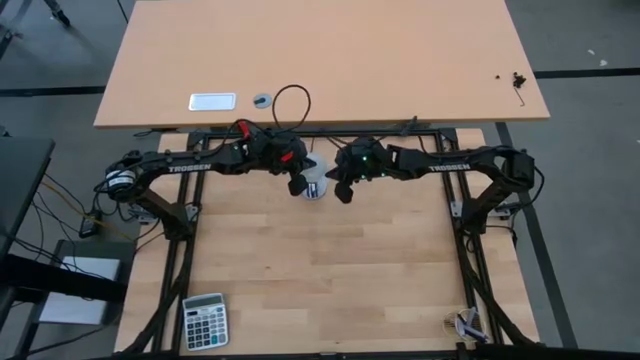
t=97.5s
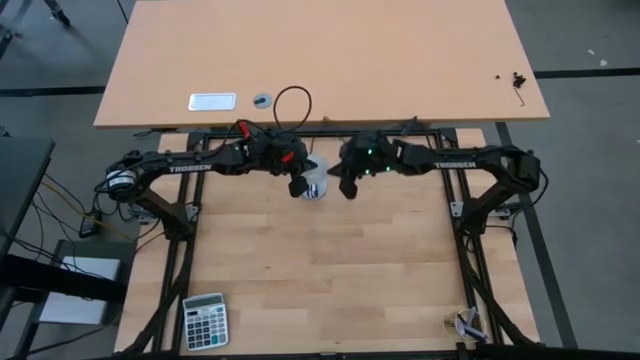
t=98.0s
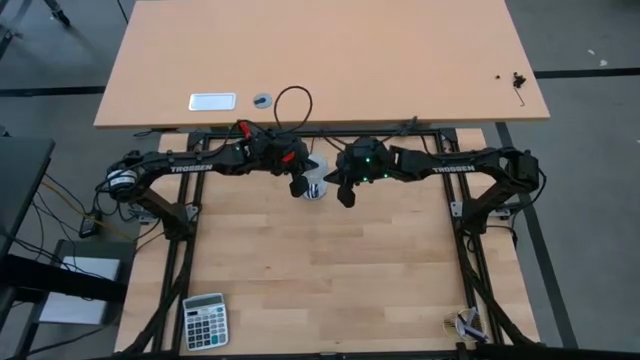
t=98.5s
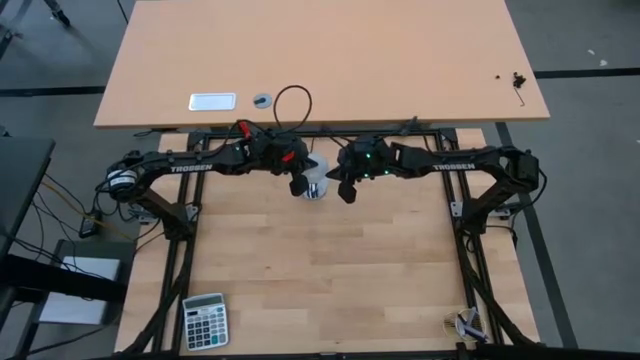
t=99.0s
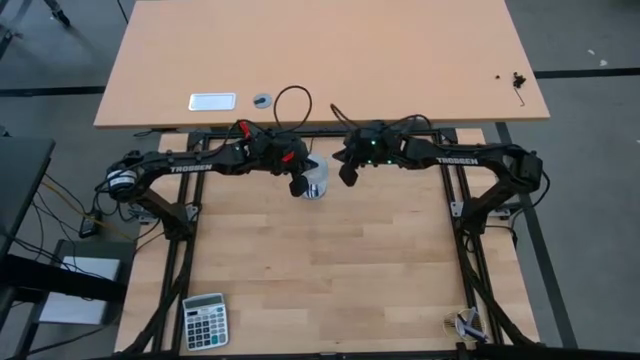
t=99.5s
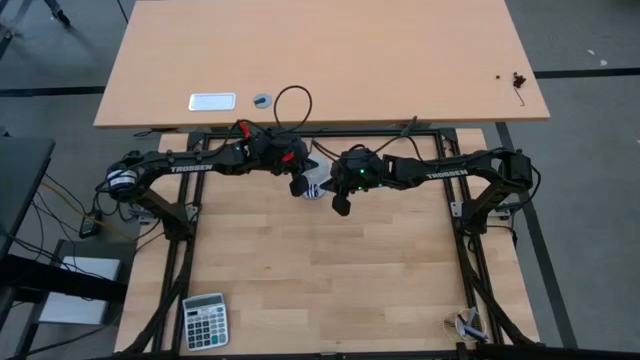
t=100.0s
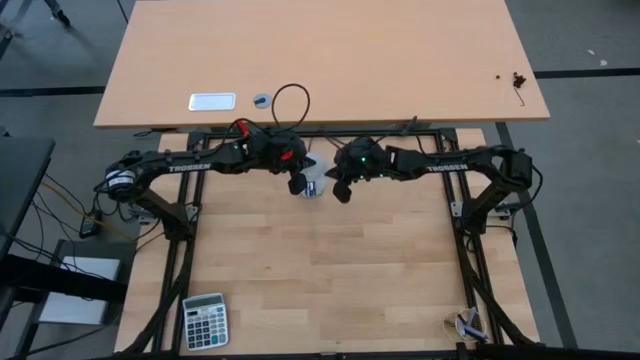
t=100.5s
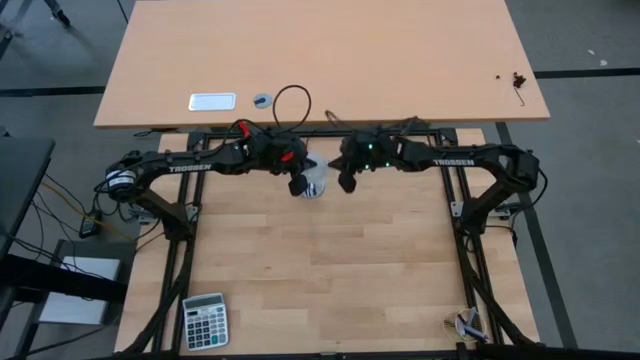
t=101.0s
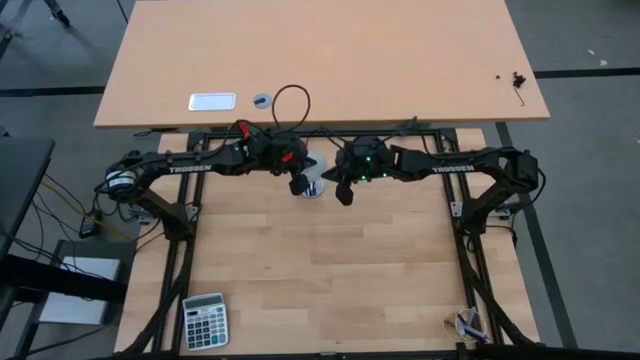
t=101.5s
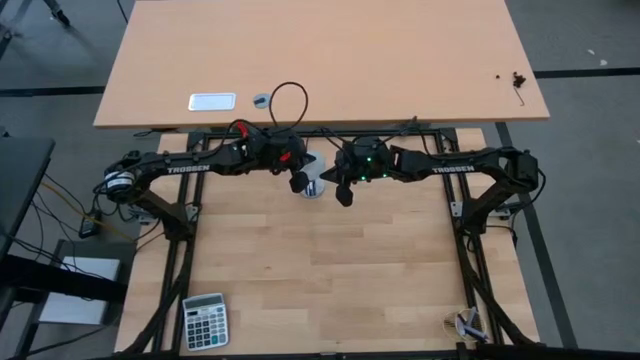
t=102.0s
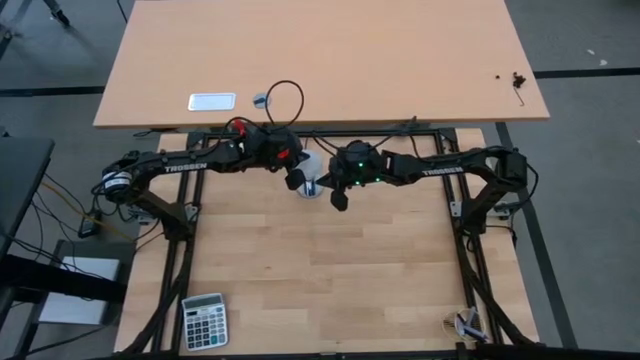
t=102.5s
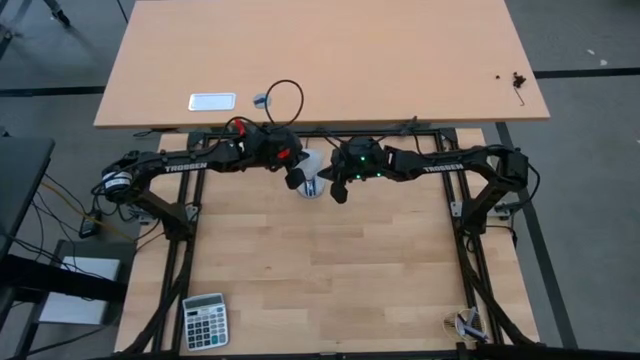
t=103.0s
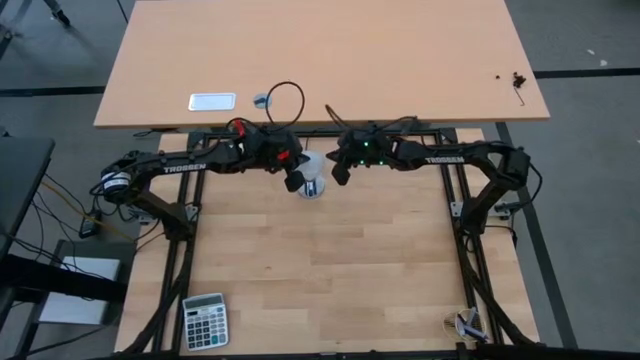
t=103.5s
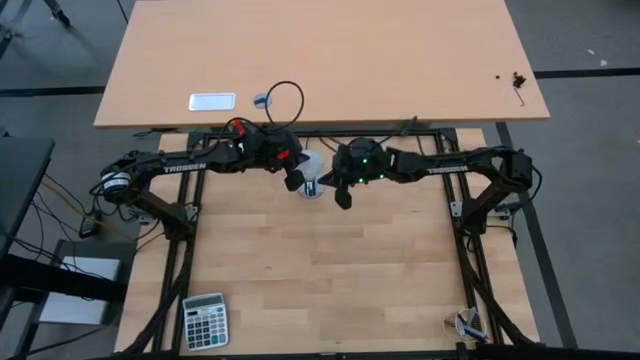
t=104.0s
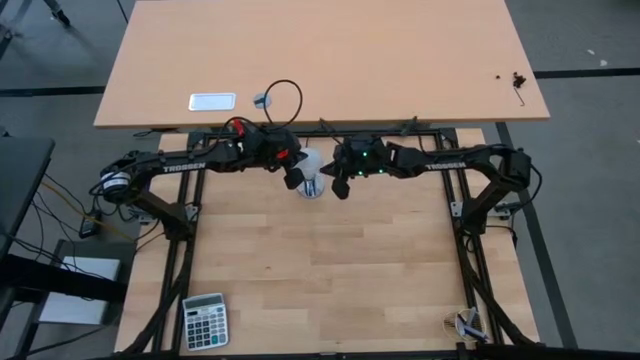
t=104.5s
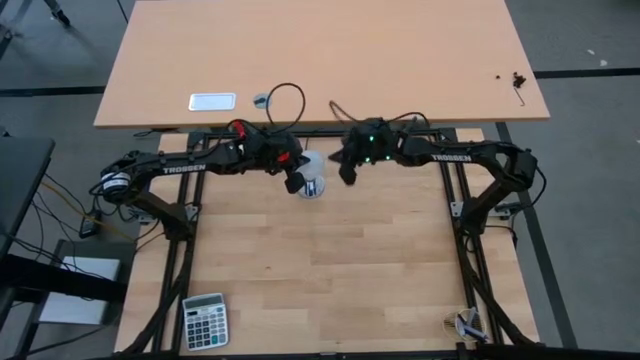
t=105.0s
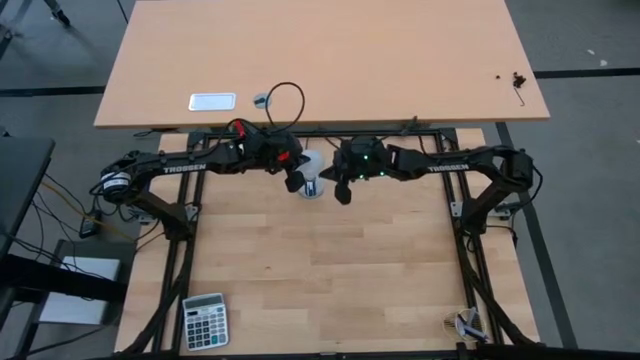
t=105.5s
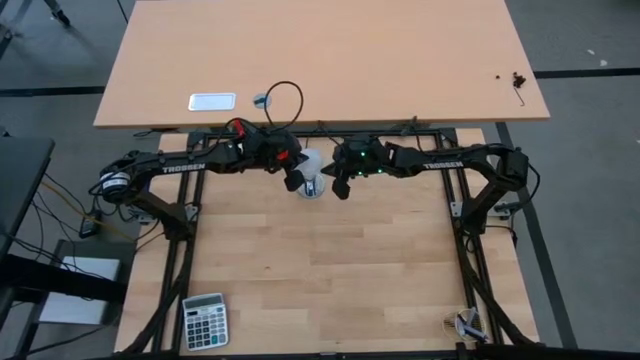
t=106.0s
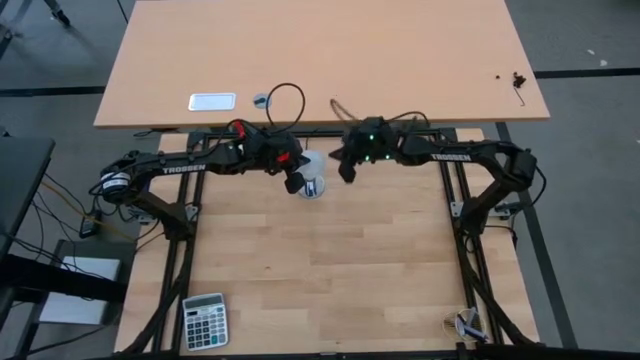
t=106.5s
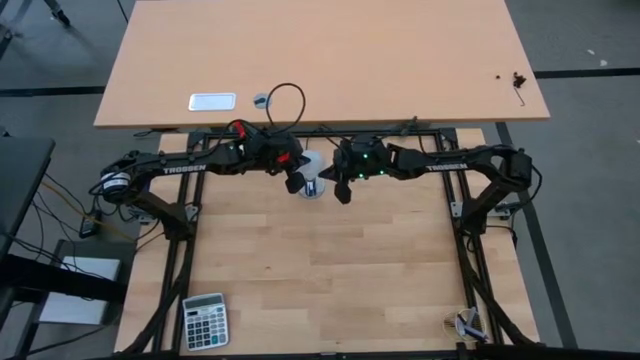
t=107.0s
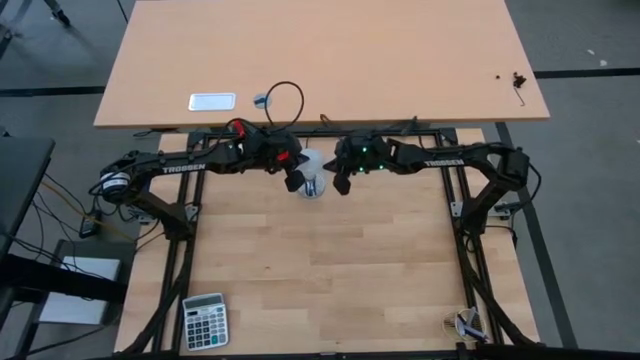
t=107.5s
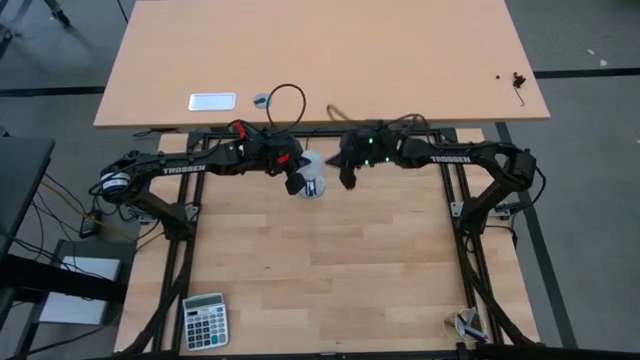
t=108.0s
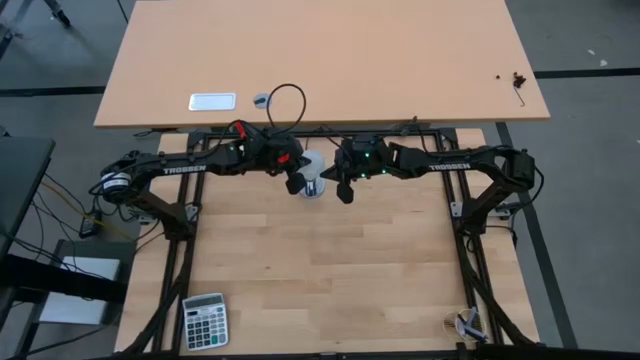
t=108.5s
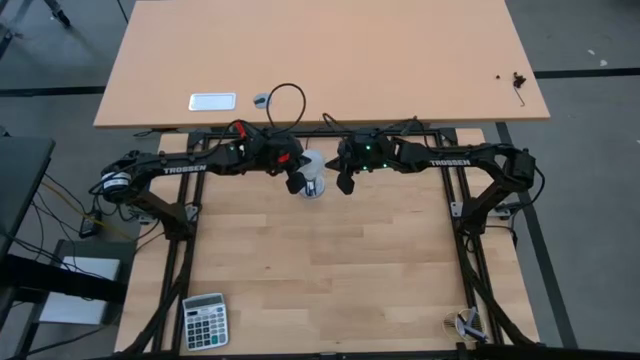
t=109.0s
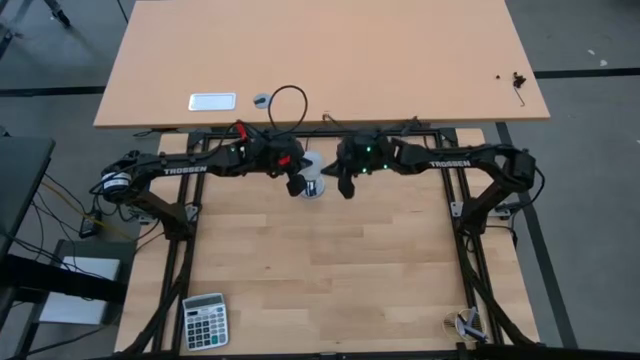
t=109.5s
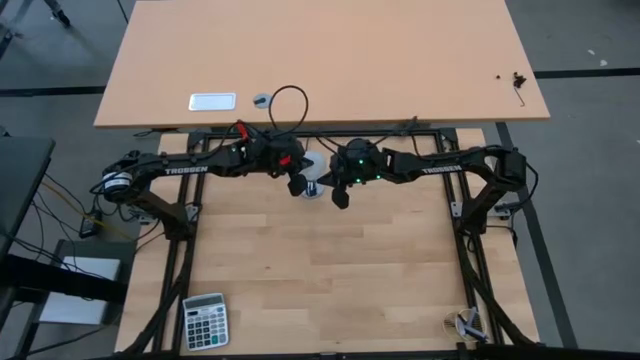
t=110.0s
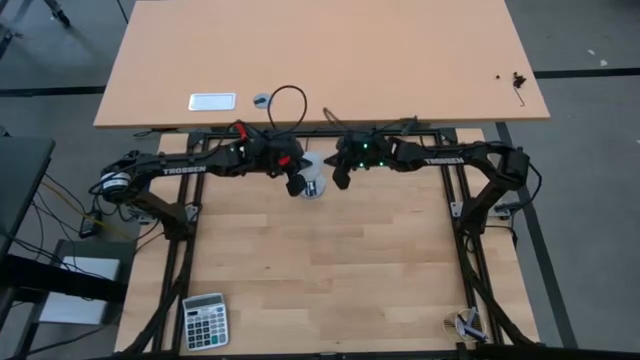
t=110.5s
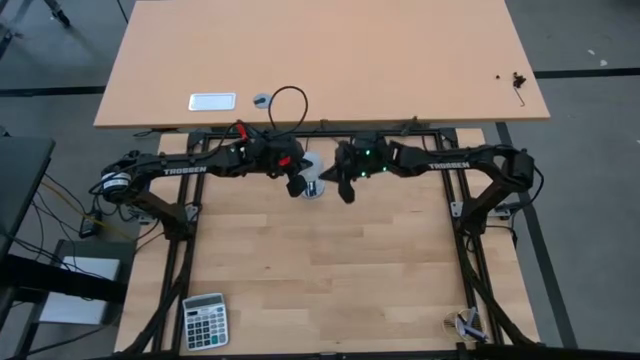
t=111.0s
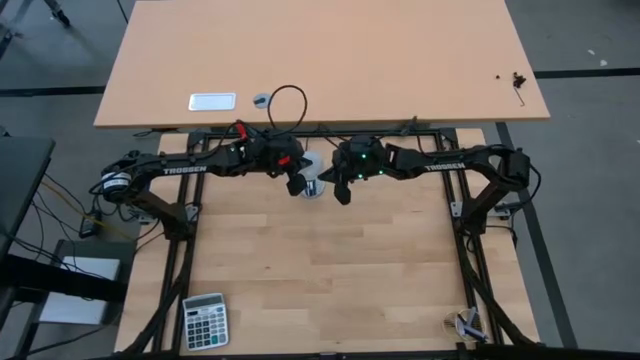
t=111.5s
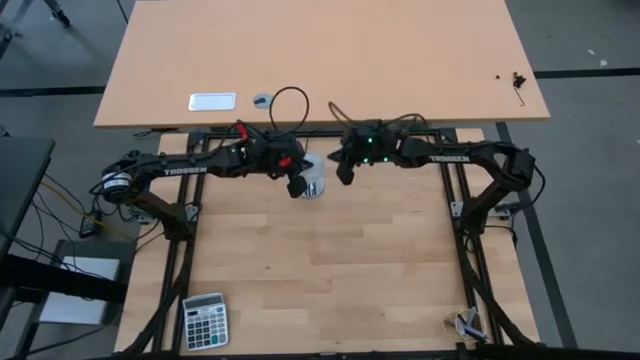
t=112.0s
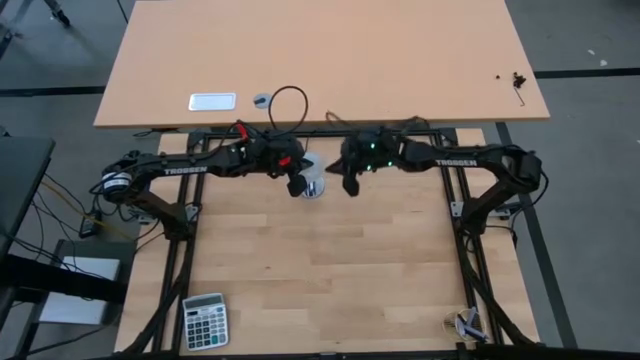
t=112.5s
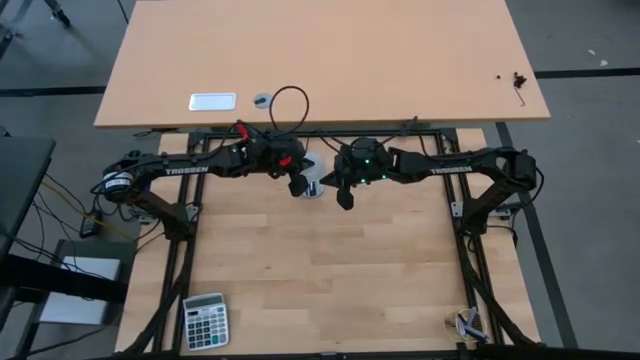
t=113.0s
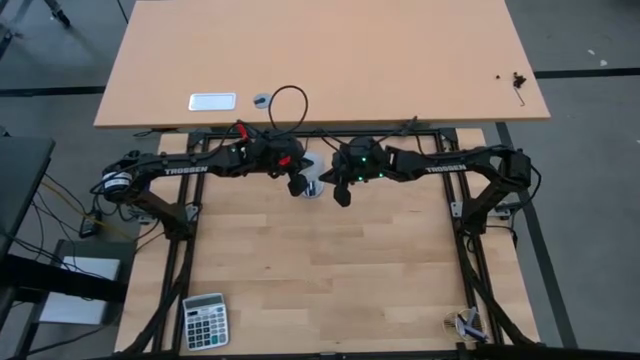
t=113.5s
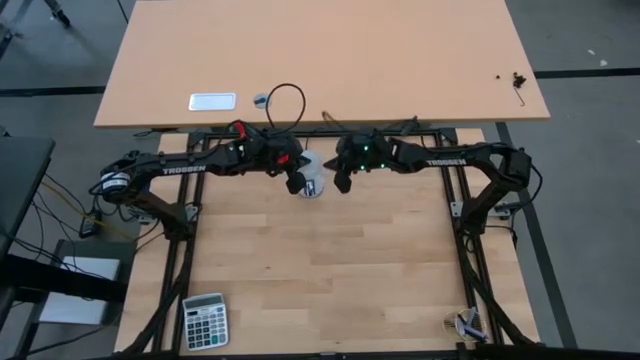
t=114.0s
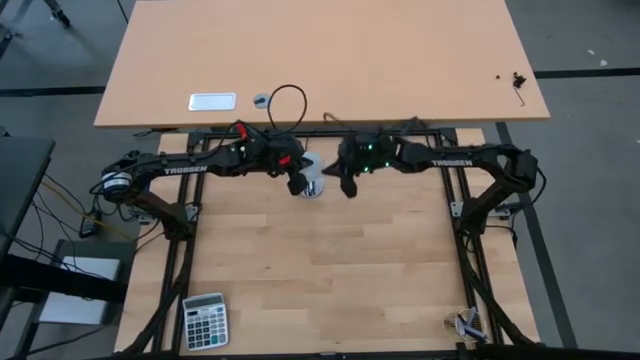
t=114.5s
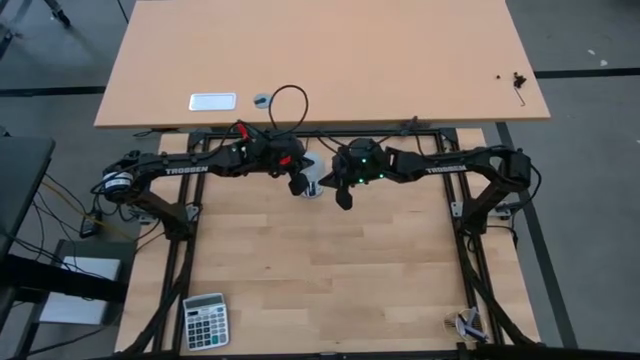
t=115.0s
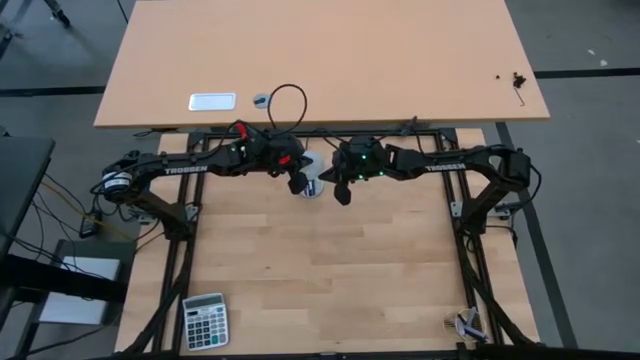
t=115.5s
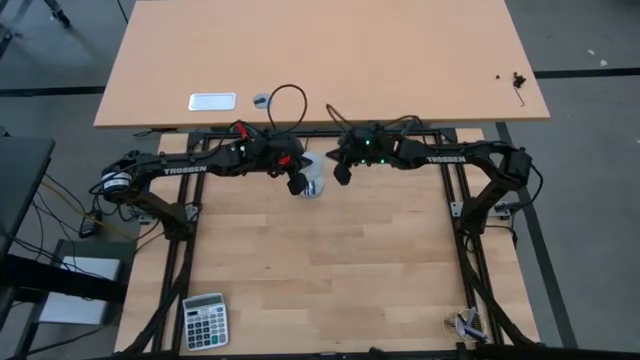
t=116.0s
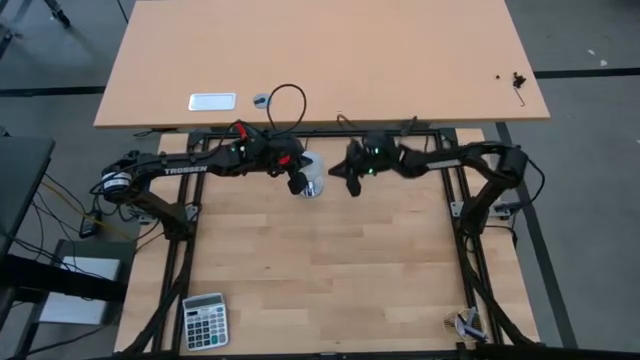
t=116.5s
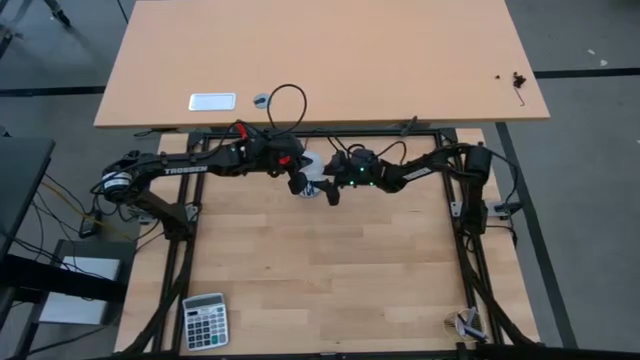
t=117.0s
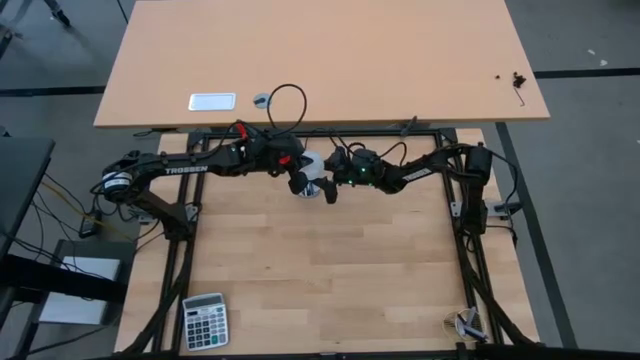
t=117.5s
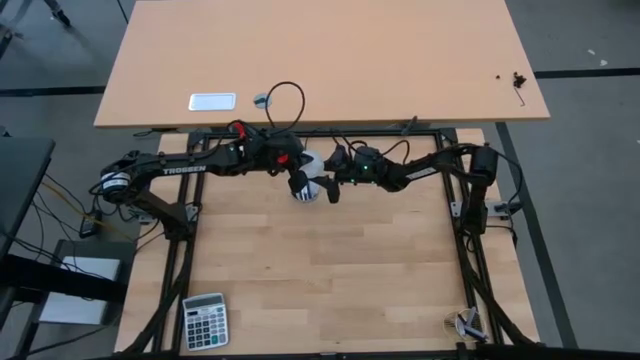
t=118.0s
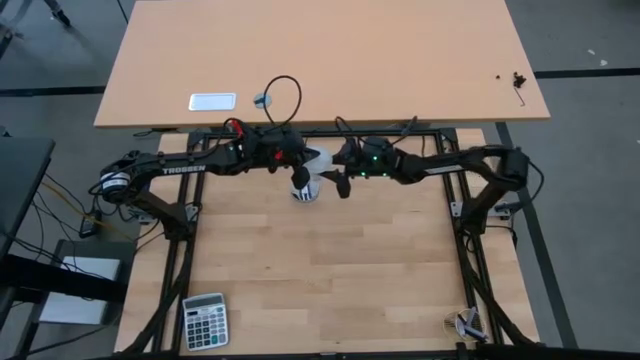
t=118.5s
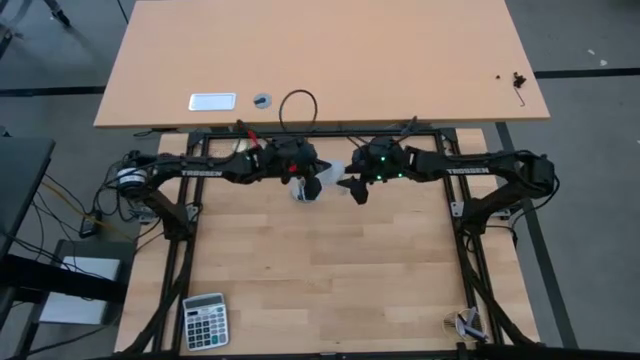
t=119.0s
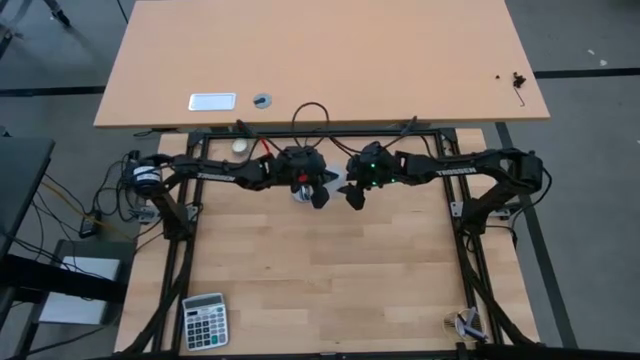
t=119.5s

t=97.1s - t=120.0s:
Task: Screw lightbulb
Remove the lightbulb from the lamp
